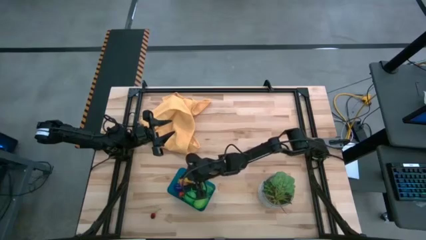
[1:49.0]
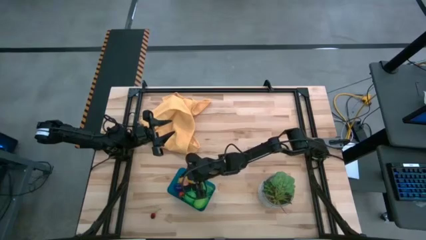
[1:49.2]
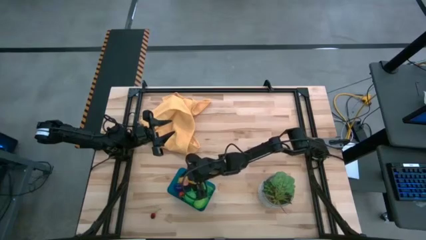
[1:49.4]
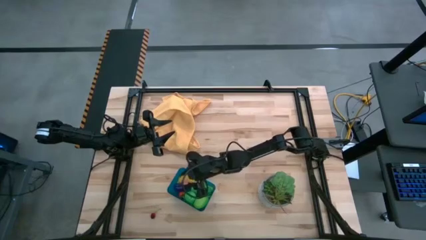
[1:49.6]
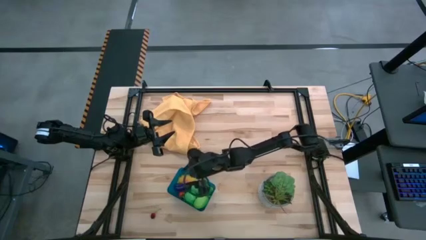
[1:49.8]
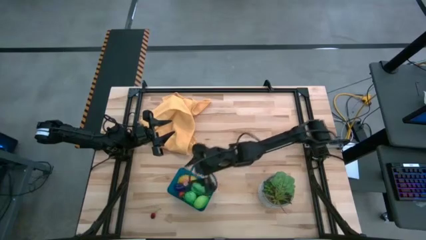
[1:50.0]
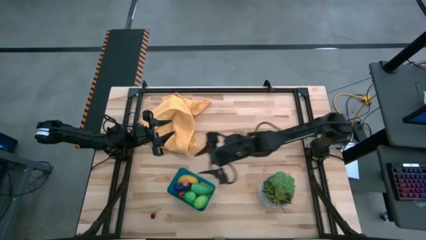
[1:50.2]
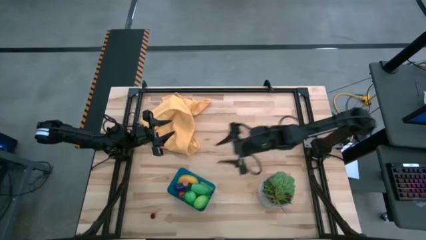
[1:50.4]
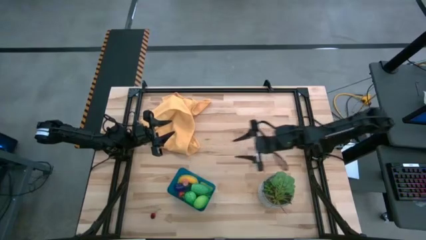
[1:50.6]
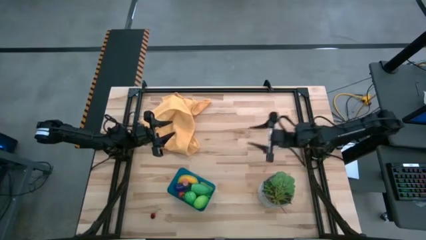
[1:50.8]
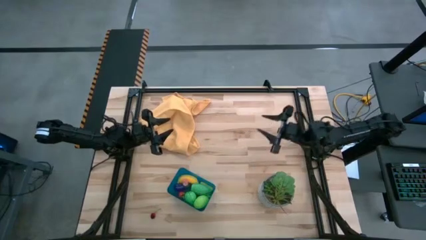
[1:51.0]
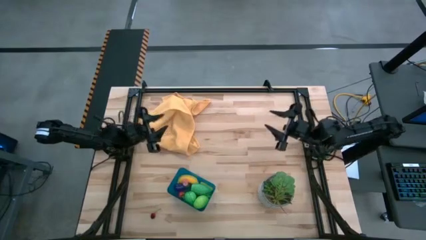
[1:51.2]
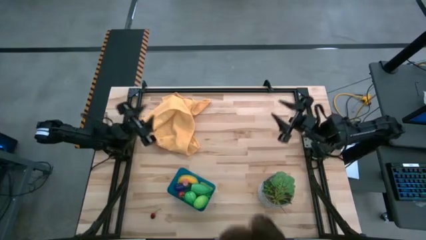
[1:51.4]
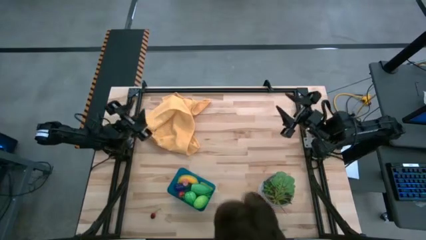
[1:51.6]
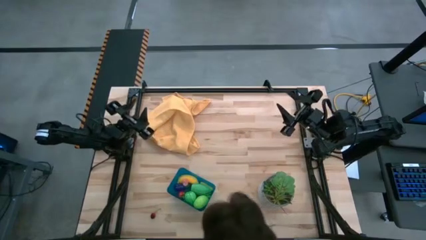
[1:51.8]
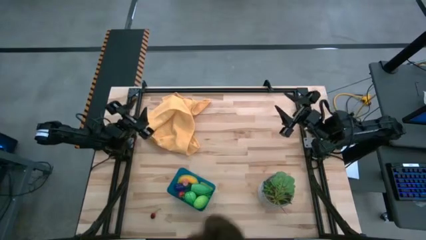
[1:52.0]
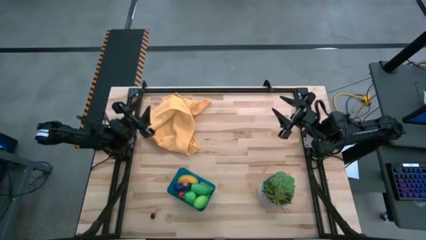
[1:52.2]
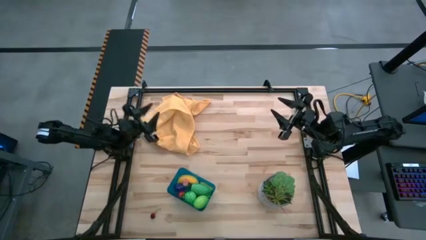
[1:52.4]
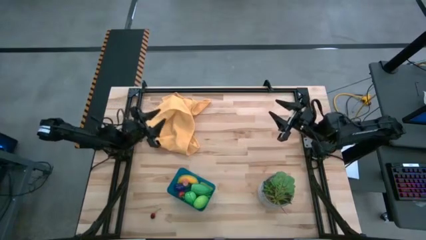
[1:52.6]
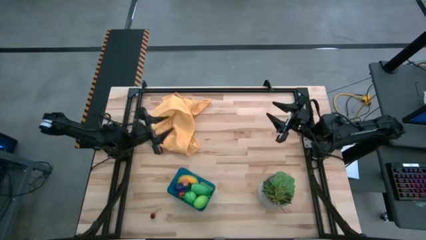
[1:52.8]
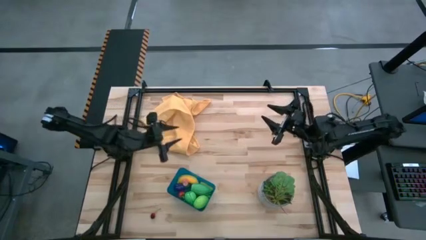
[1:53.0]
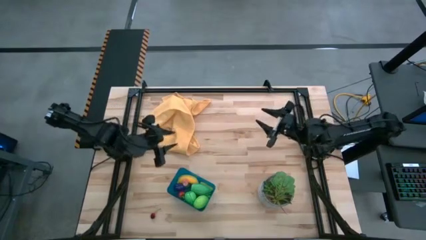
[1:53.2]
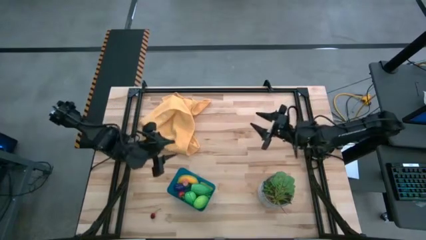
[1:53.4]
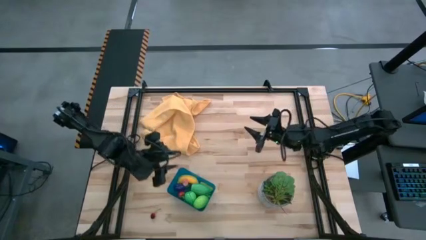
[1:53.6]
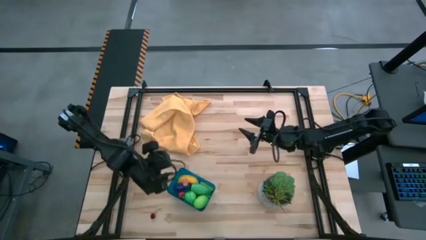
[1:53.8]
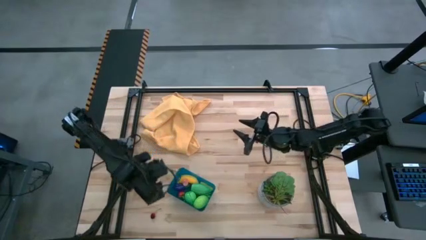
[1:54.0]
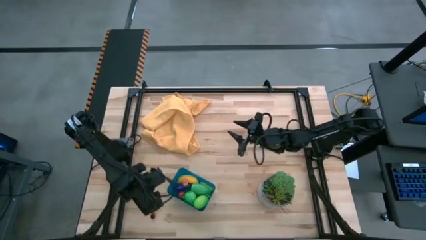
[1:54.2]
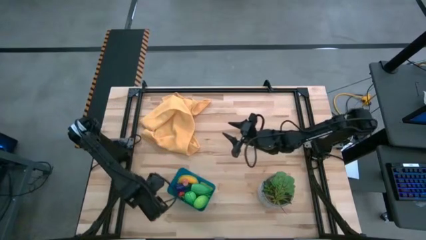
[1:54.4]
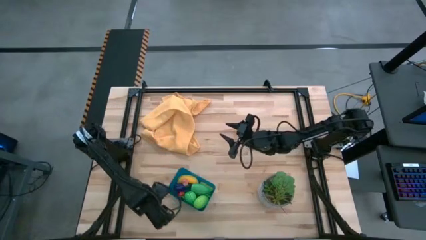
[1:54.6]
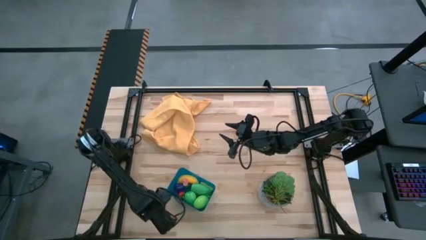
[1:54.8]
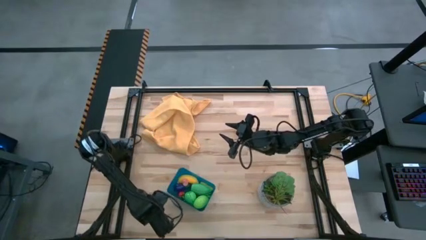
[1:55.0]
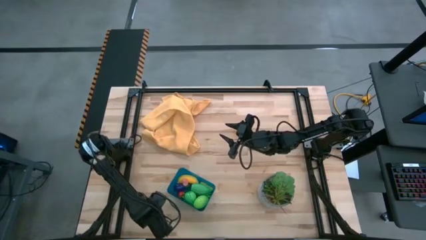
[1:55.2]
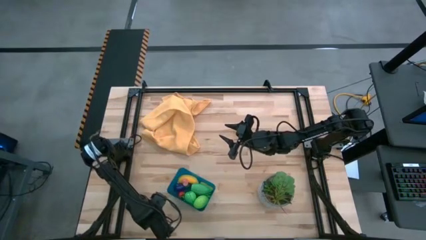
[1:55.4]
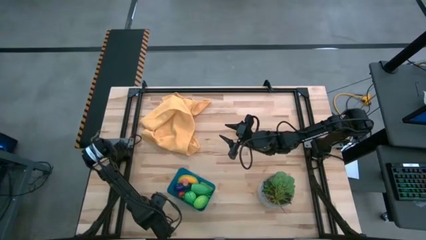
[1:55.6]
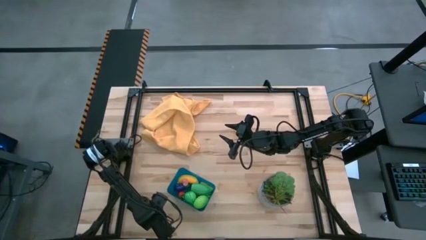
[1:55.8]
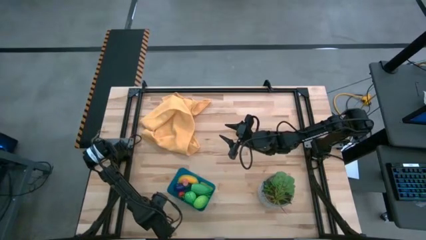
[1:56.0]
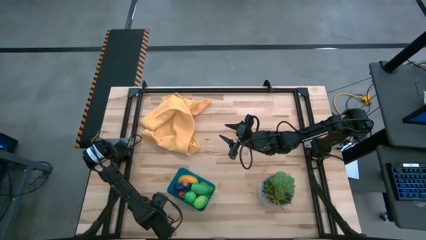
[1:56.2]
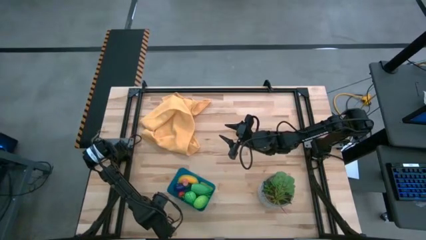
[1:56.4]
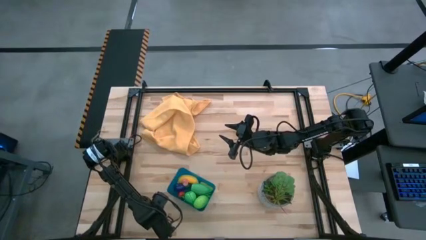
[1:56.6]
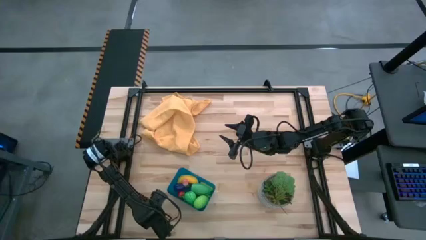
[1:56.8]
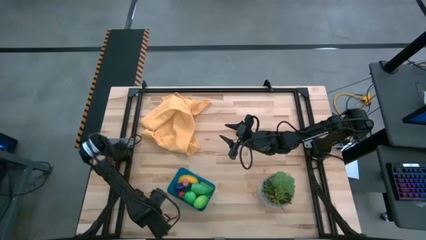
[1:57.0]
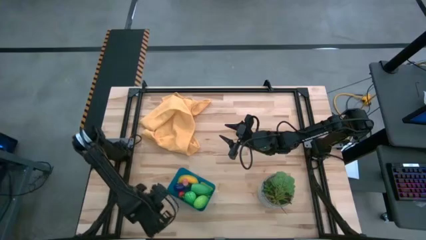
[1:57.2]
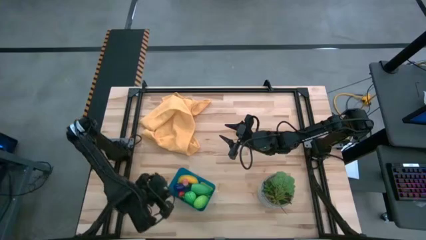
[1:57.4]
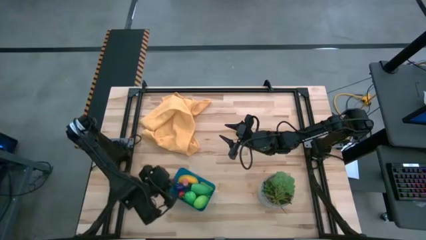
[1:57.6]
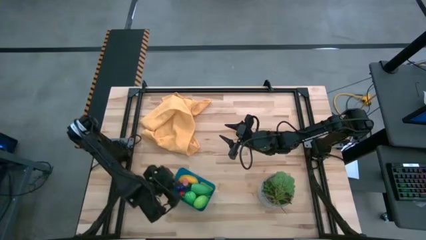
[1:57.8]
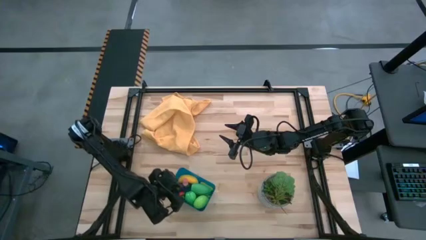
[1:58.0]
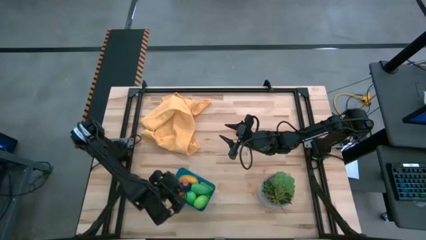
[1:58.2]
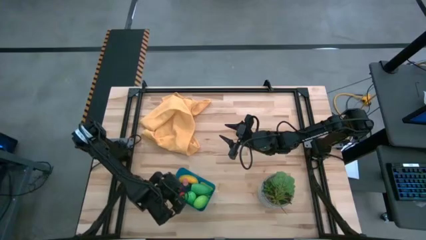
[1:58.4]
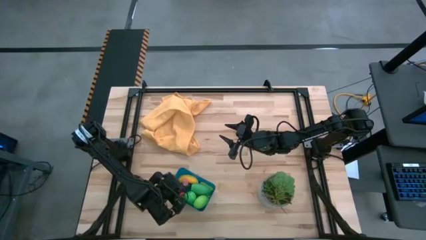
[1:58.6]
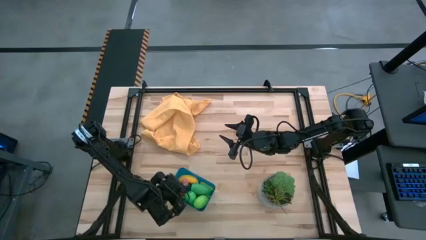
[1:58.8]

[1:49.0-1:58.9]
Task: Pick and placing Produce into tupperware
Put the cherry into the blue bin

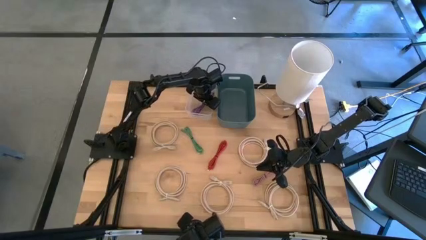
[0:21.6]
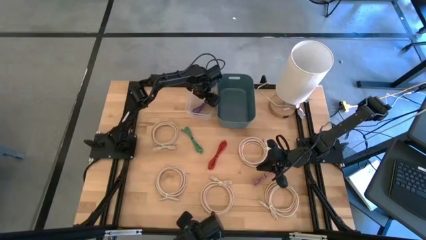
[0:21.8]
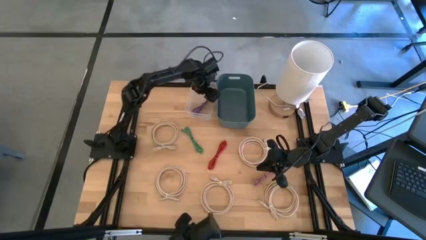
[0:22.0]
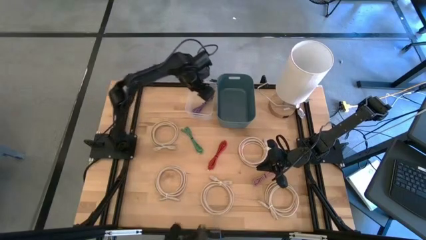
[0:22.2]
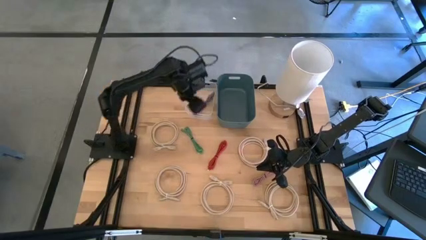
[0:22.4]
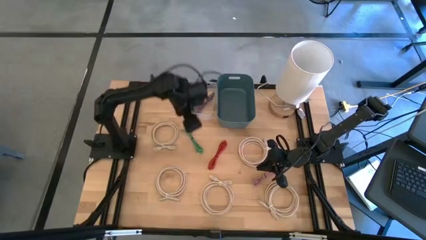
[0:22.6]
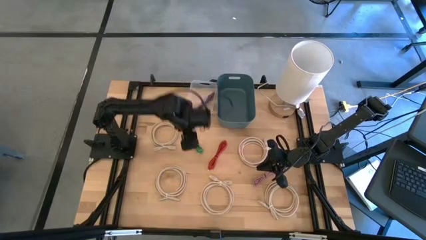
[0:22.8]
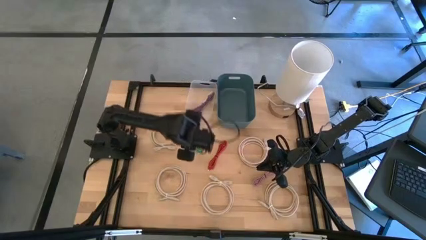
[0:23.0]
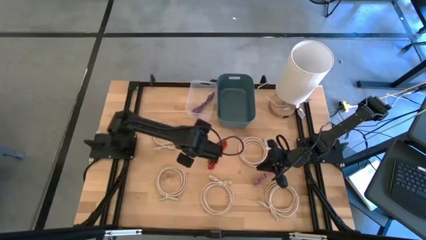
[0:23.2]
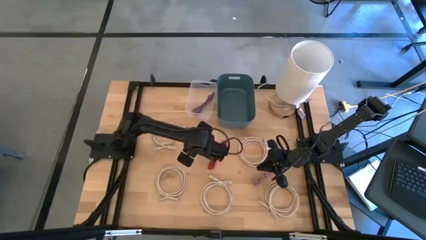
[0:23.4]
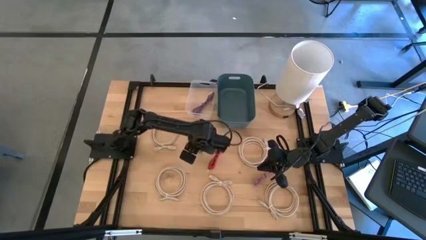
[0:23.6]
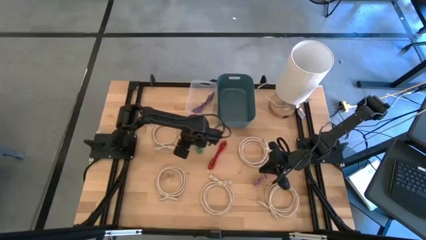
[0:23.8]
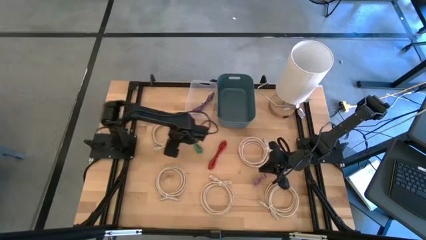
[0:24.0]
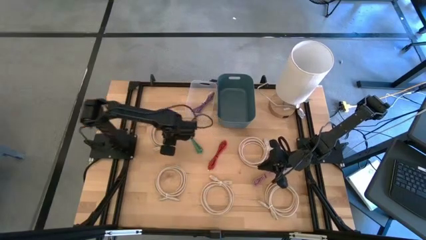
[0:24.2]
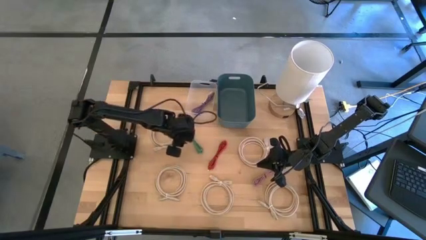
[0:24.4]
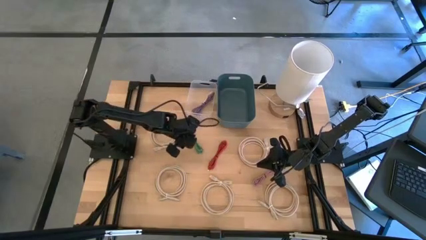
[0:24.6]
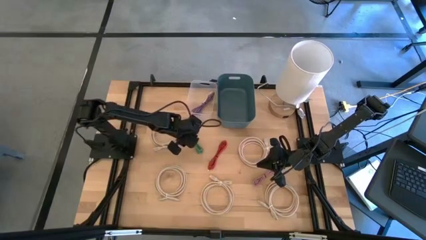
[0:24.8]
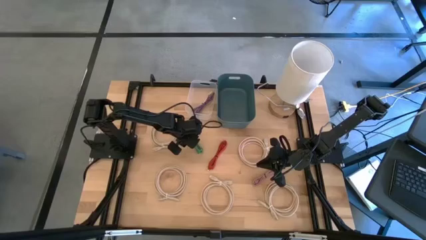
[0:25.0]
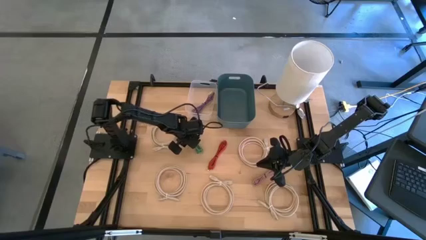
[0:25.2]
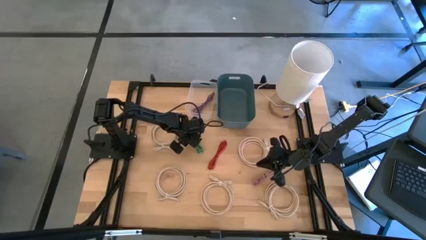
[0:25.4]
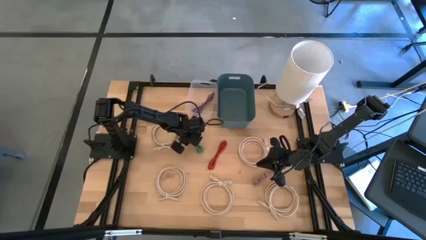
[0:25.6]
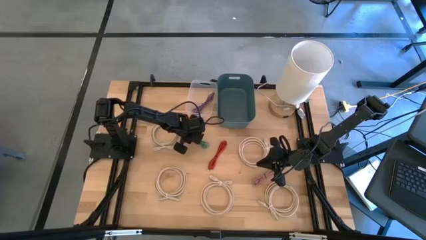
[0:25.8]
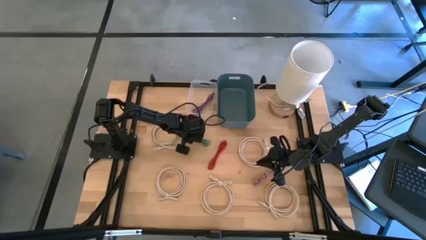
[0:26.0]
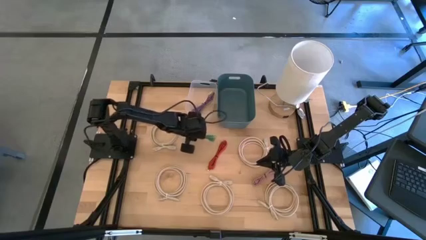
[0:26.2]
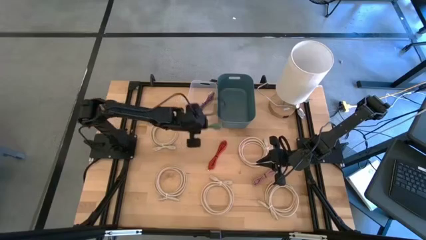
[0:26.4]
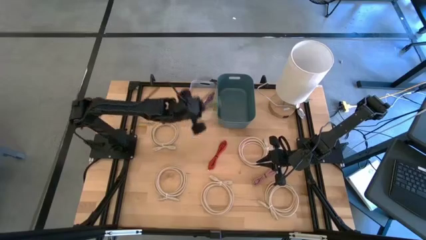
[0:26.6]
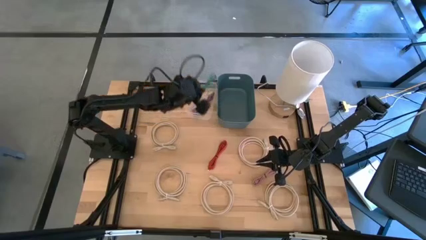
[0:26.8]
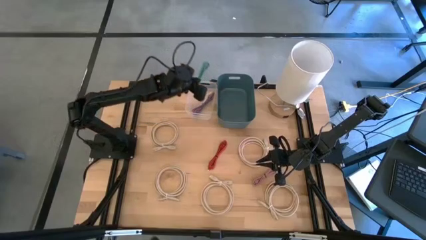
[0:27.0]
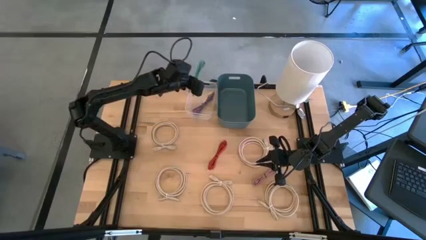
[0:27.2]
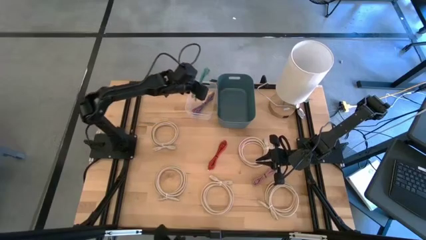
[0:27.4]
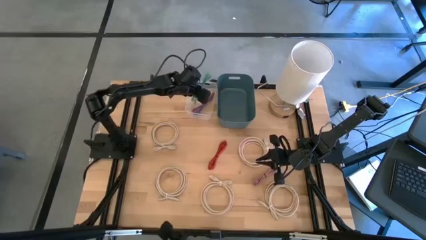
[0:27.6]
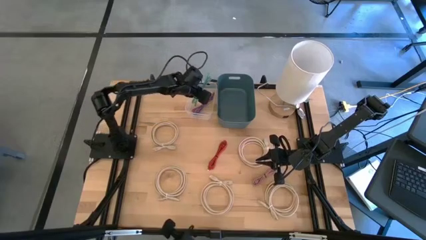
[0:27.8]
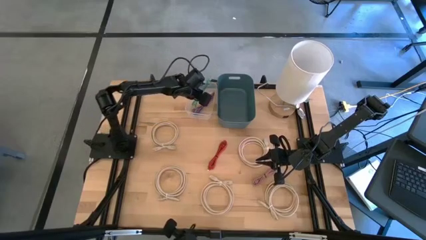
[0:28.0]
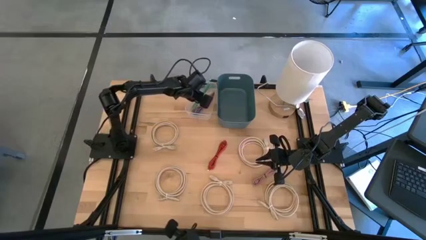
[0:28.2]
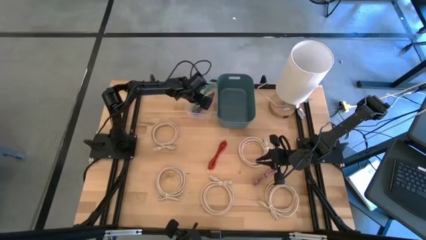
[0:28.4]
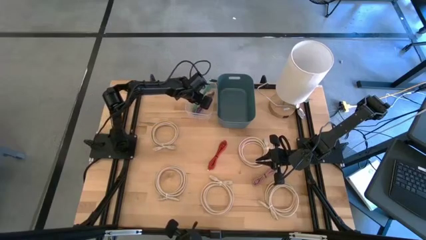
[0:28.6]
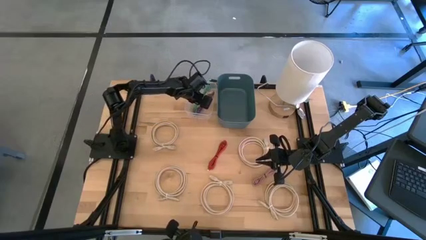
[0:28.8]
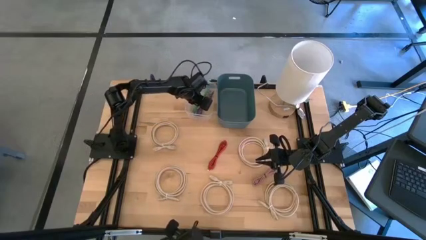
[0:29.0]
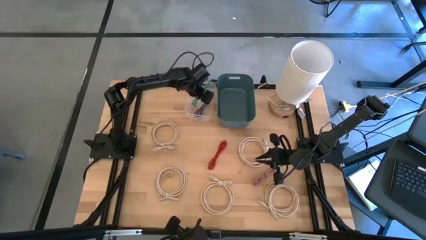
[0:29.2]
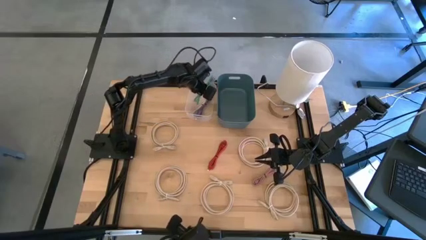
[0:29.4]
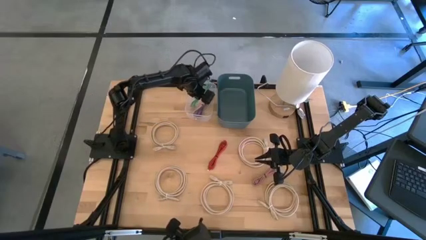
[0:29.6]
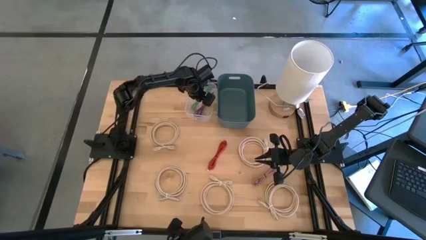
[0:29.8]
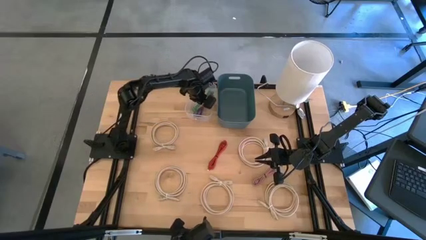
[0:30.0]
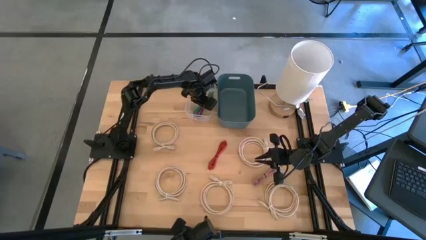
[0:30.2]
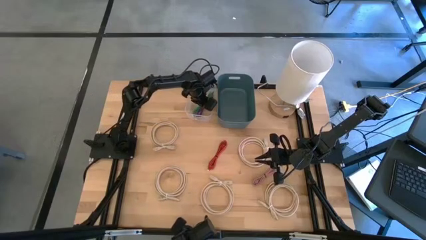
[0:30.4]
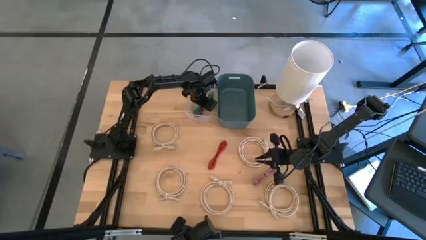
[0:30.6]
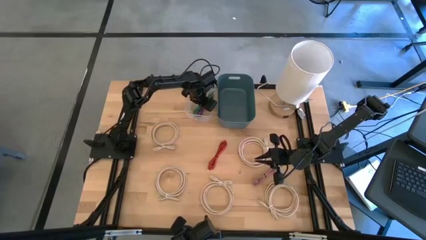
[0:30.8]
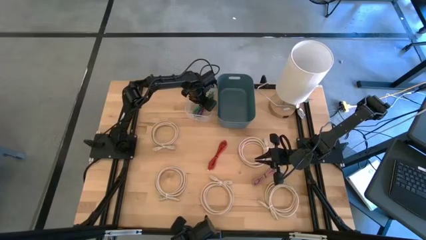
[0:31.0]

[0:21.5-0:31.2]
Task: Pick and place USB-C Cables
Put the green USB cable into the transparent bin
